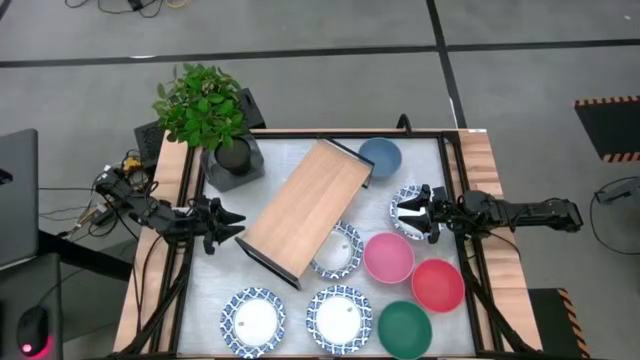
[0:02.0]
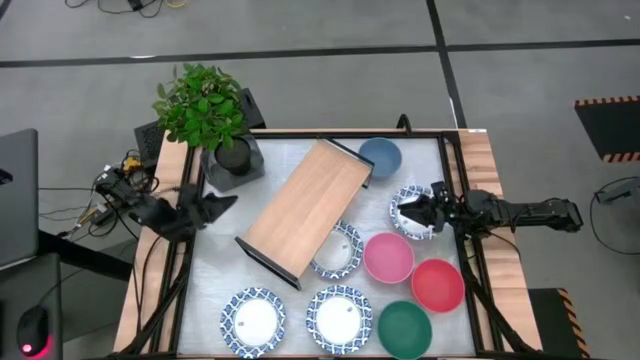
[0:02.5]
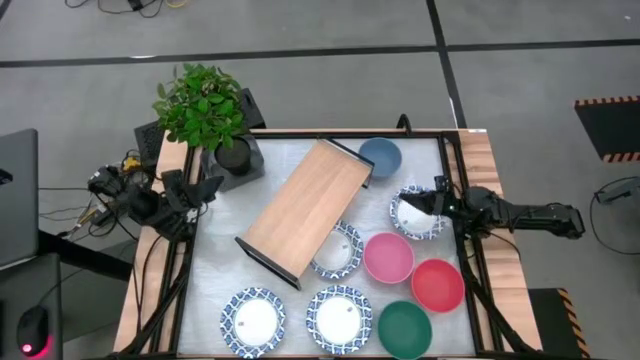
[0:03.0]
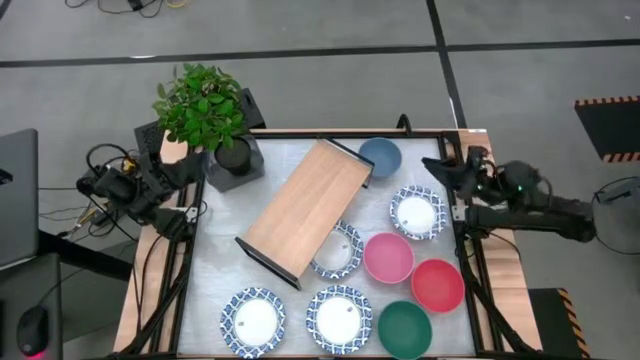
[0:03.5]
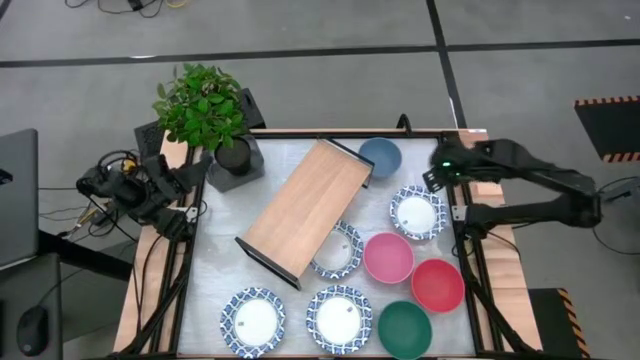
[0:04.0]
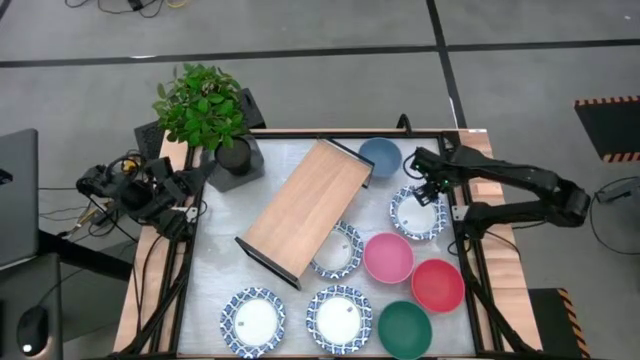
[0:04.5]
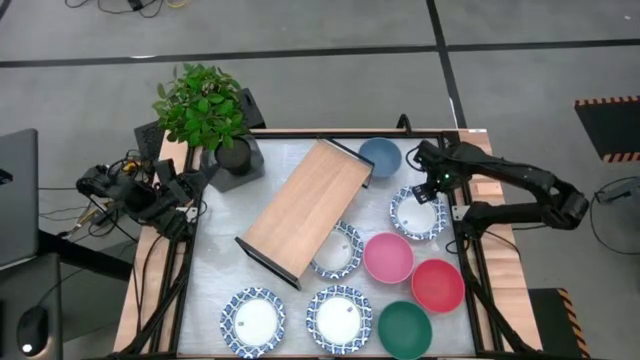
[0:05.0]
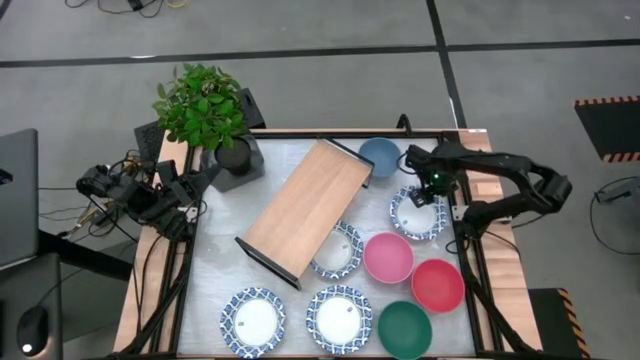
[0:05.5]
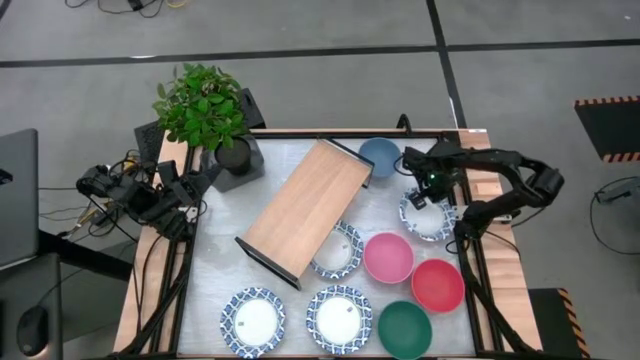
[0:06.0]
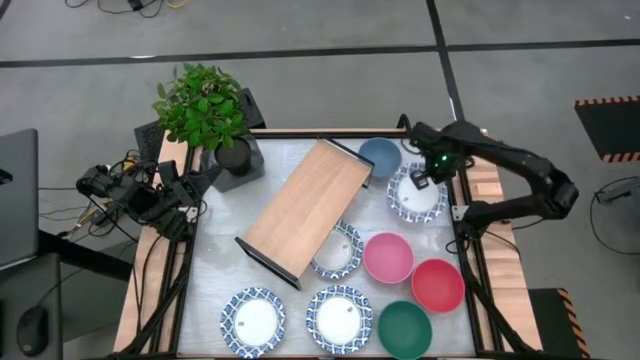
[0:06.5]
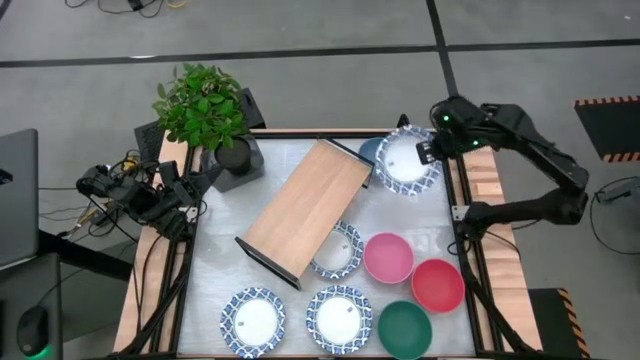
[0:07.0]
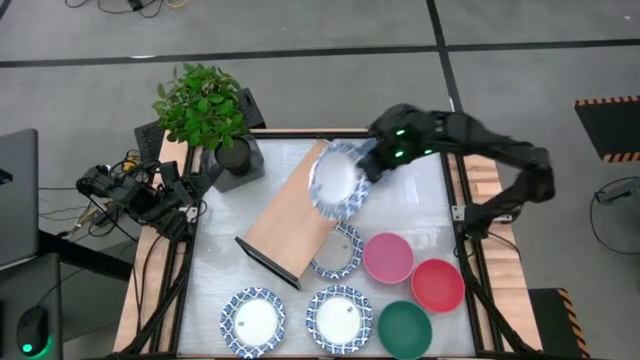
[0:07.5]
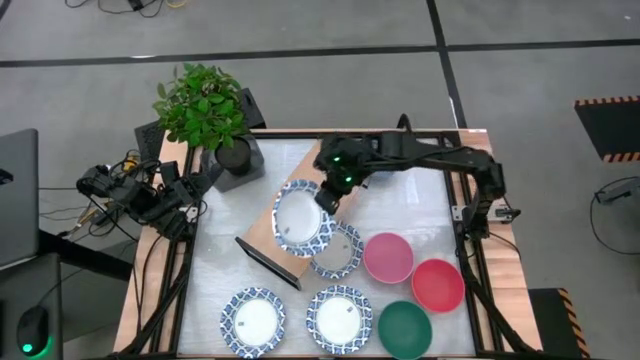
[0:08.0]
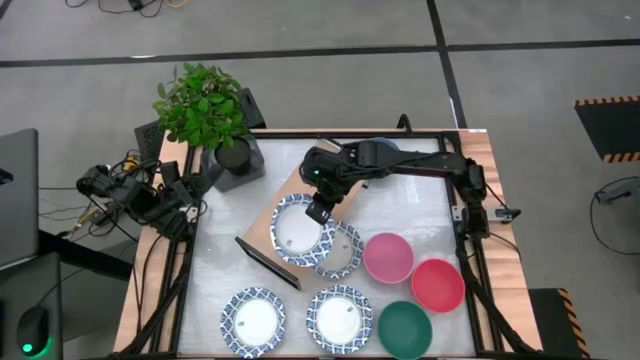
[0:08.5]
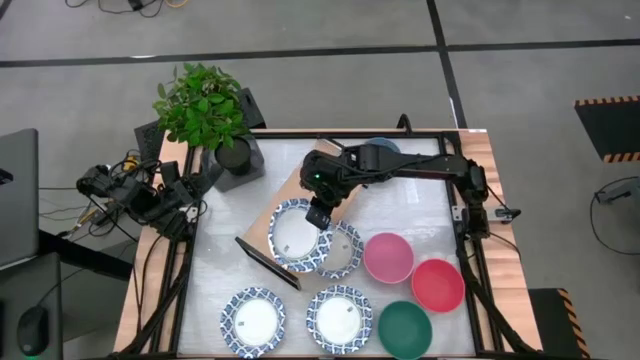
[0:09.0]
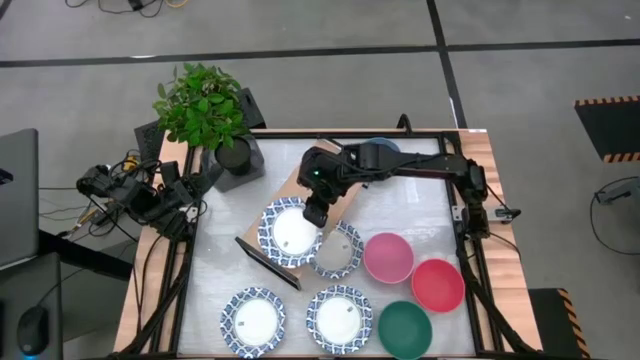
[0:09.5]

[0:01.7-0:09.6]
Task: Place and stack bowls onto a shelf
Put the top right white patterned bowl on the shelf

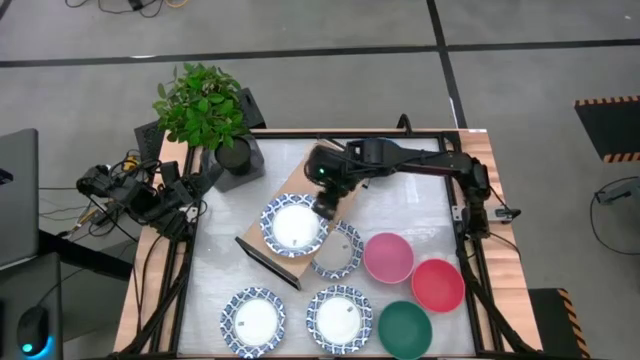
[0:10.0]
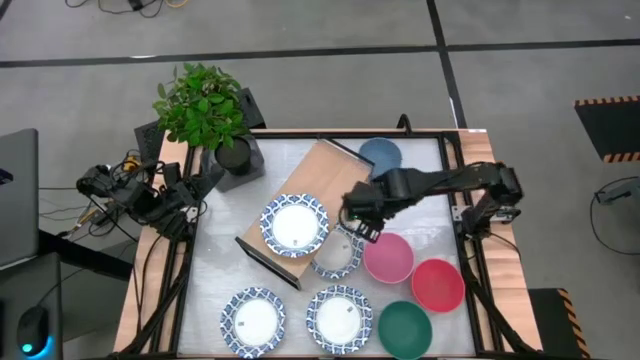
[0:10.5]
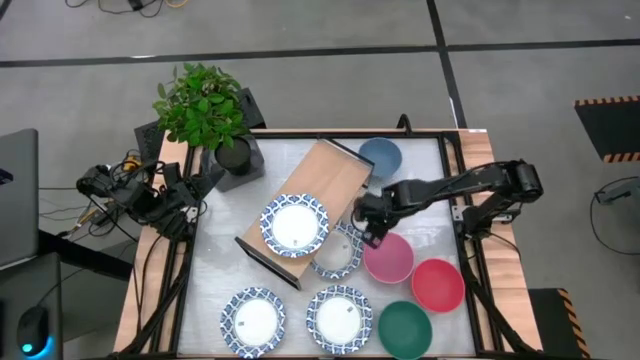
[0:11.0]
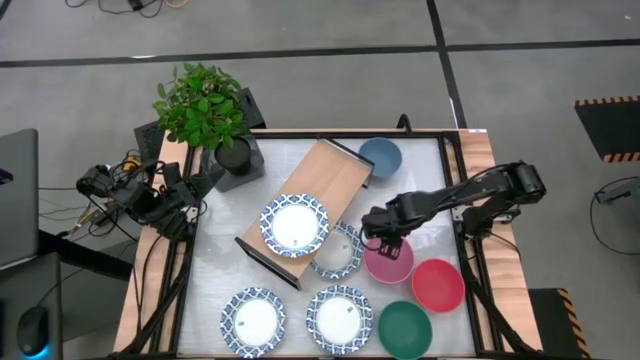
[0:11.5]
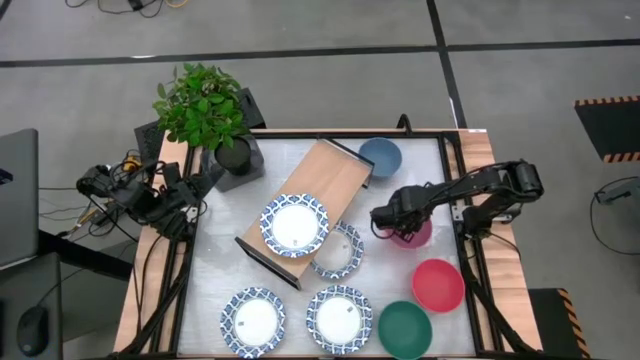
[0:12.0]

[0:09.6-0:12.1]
Adjust the pink bowl

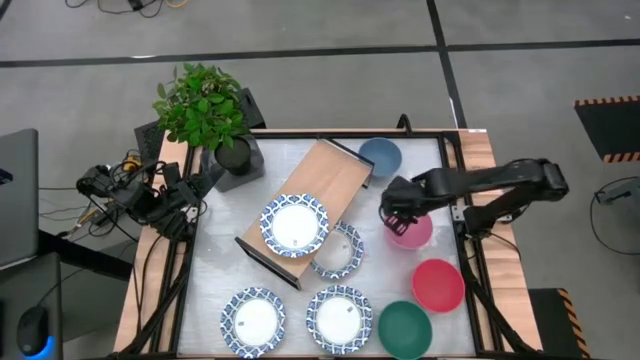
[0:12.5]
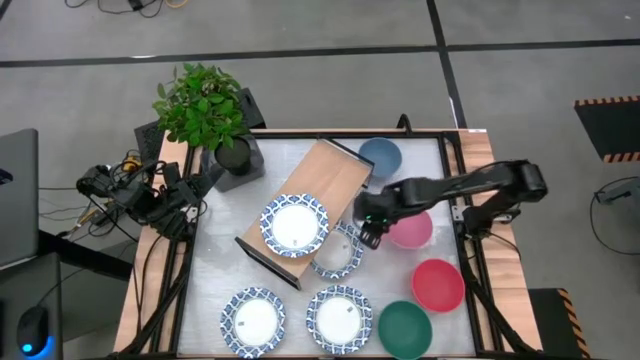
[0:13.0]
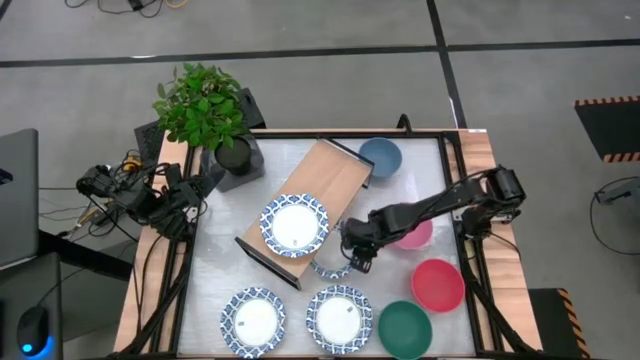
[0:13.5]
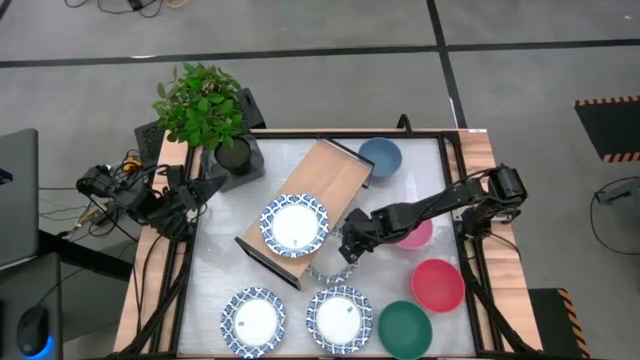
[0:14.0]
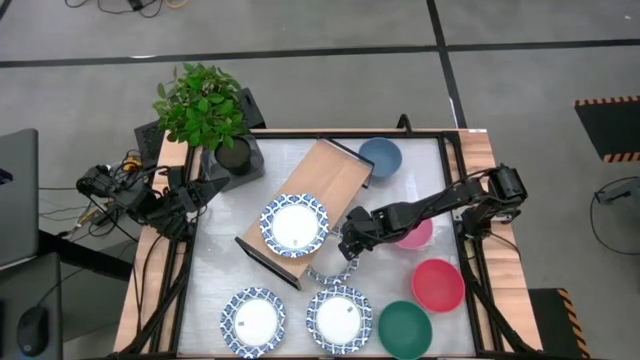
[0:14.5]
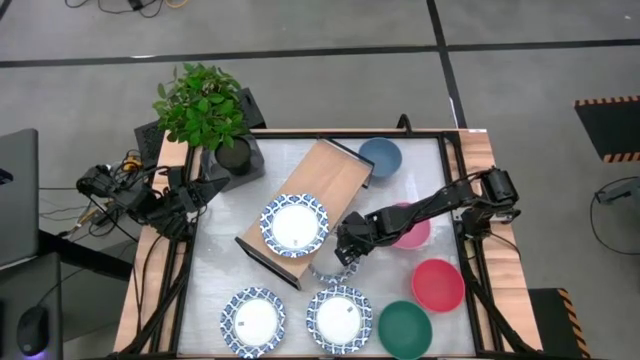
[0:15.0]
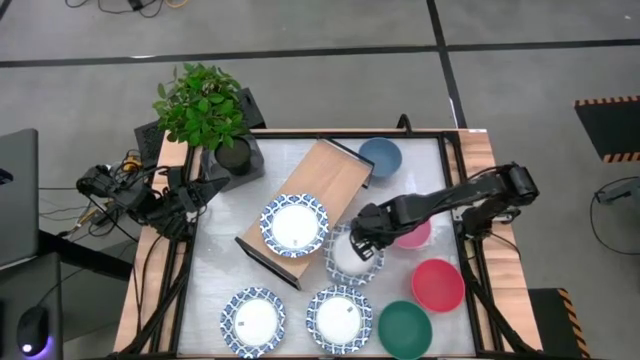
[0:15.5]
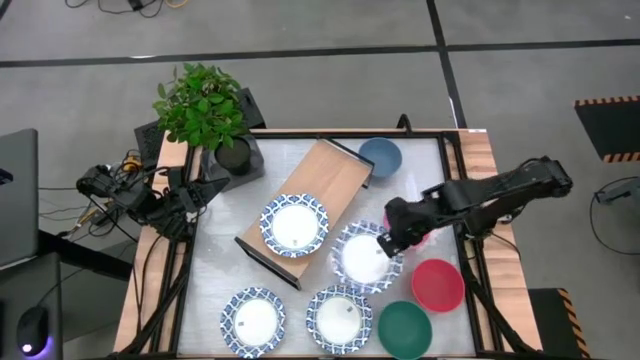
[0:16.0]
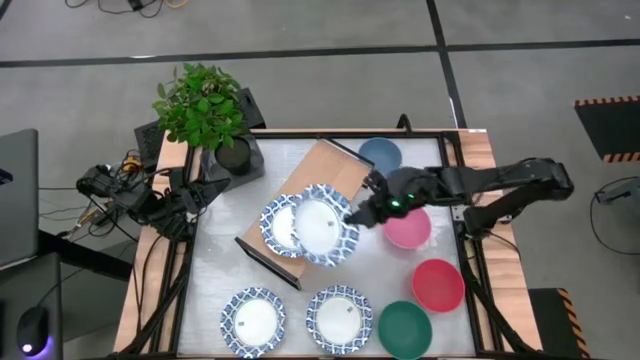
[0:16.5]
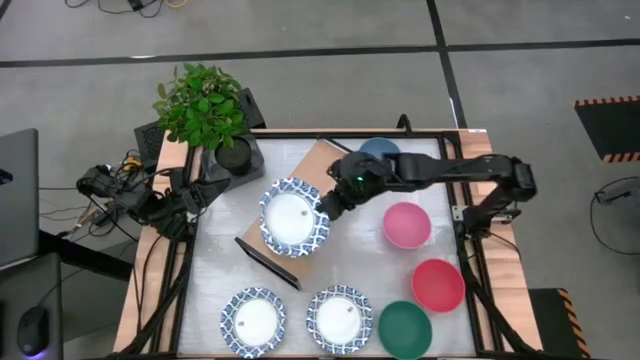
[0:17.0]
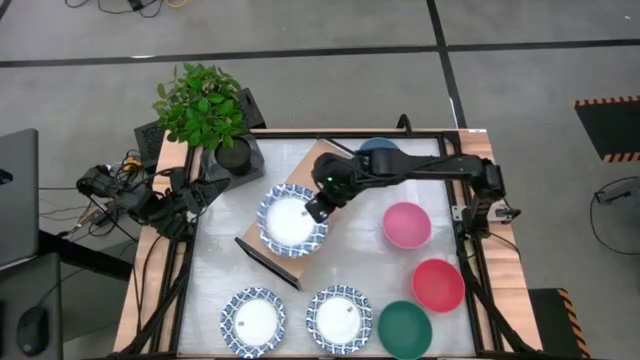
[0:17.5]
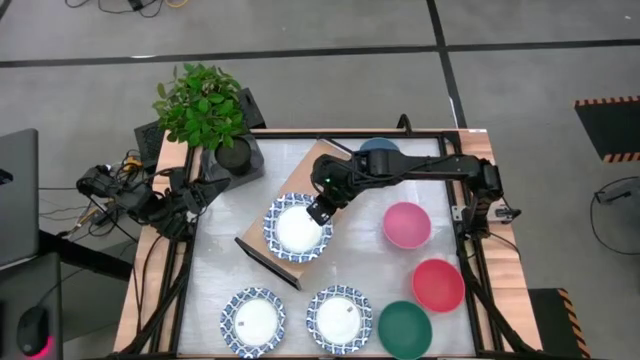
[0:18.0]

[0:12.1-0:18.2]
Stack the top white patterned bowl on the white patterned bowl on the shelf

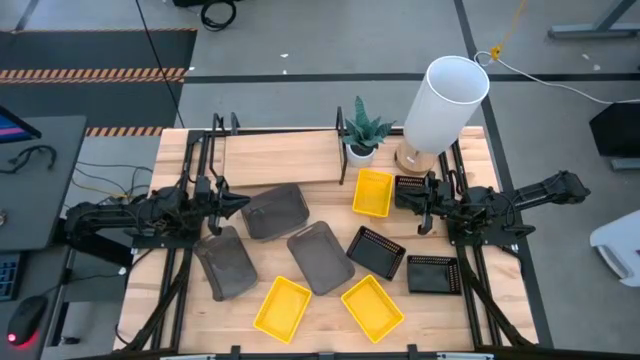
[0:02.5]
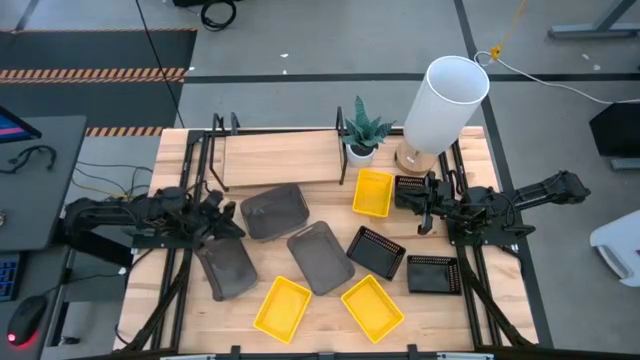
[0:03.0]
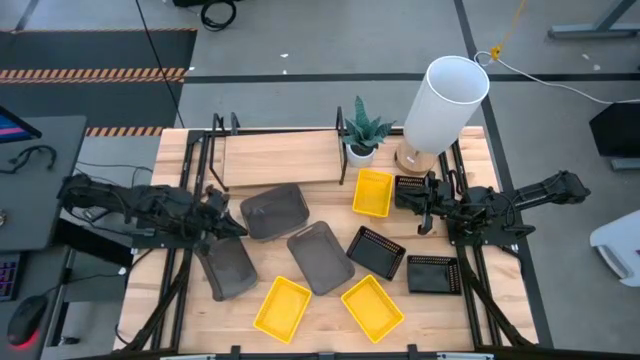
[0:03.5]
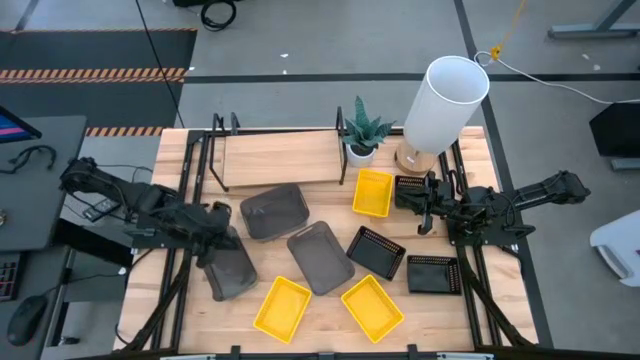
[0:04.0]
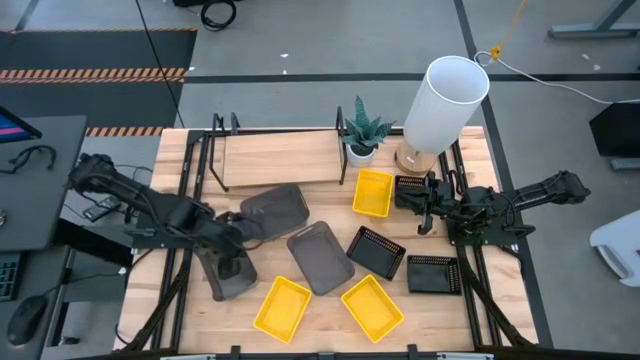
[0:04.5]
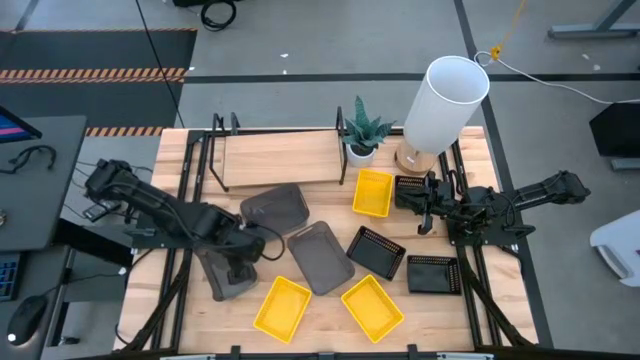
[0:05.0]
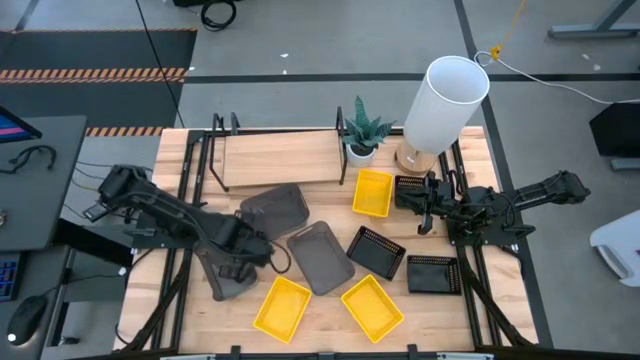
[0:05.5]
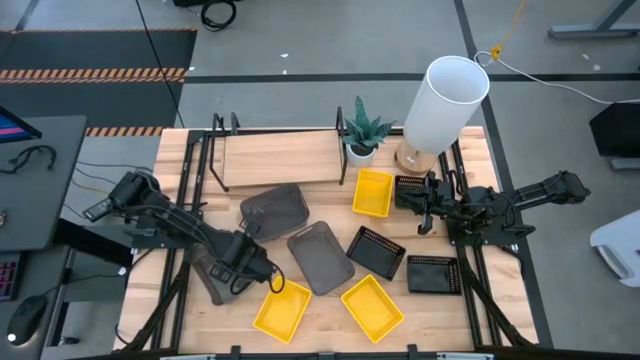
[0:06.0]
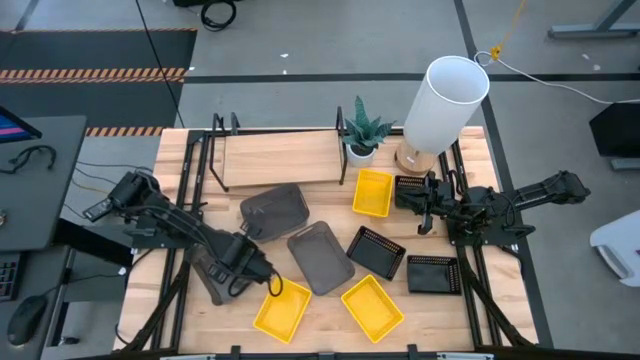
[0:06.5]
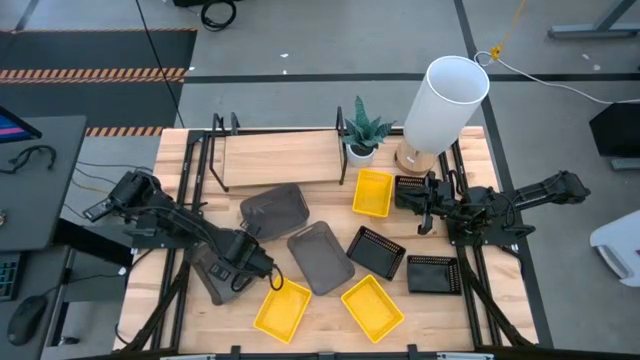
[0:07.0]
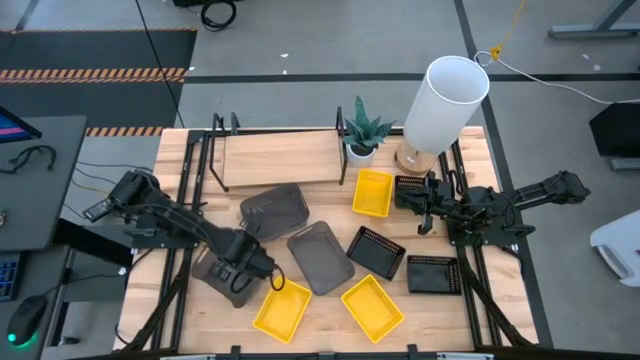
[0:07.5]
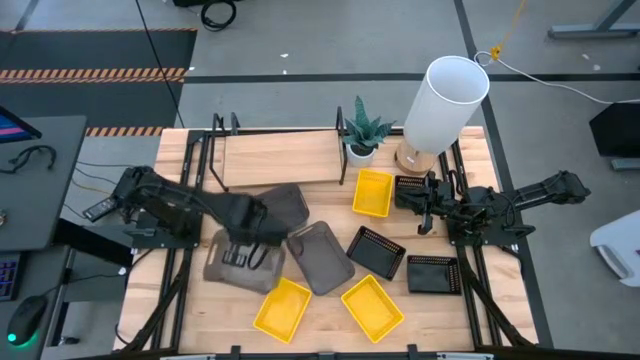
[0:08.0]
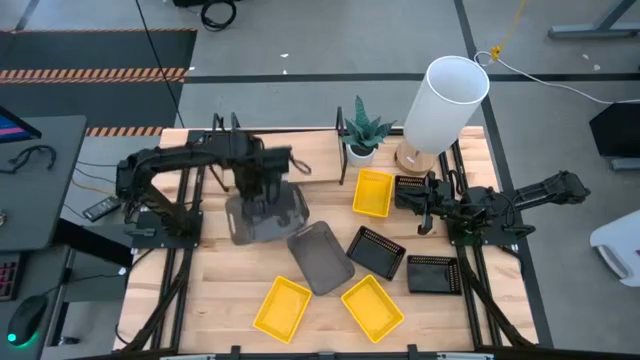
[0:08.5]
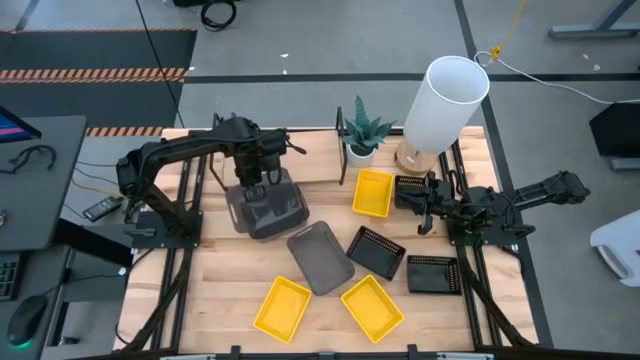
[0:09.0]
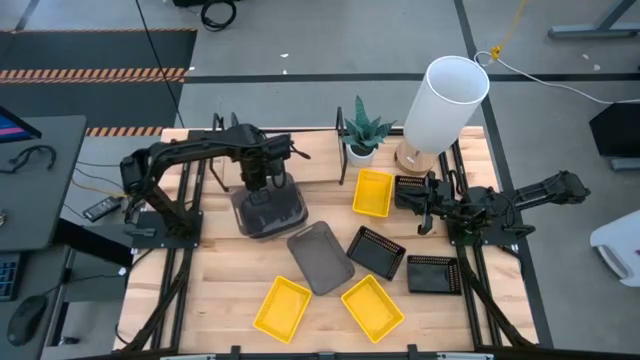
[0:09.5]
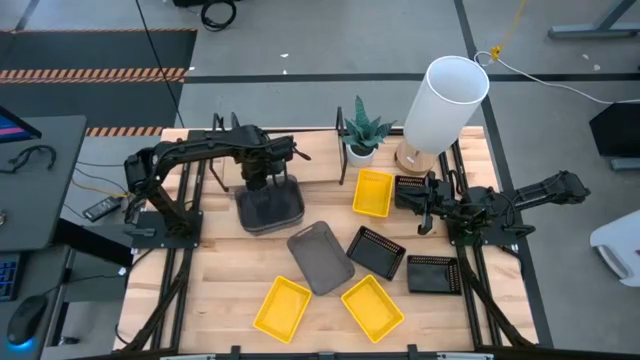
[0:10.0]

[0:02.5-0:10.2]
Task: Stack baskets on shelf by color
Stack the bottom left gray bin on the top gray bin
